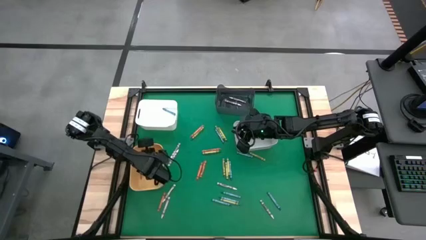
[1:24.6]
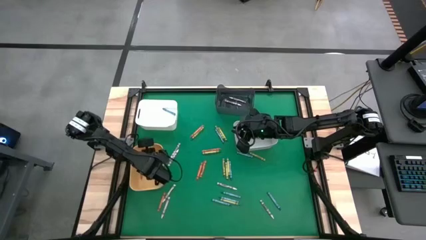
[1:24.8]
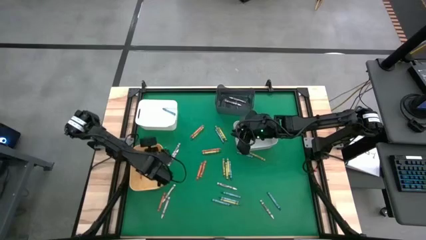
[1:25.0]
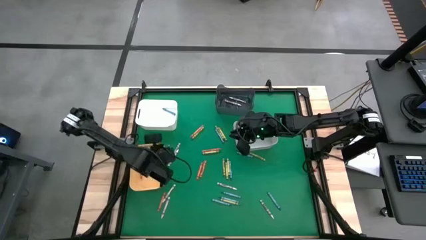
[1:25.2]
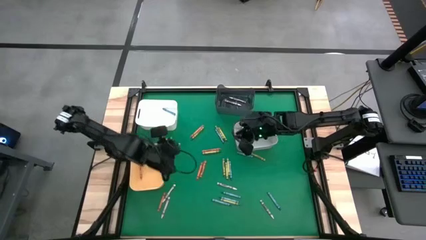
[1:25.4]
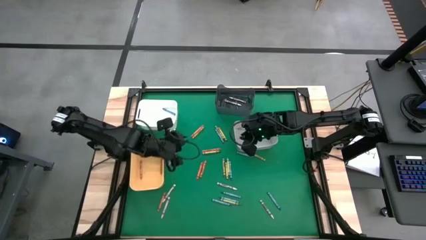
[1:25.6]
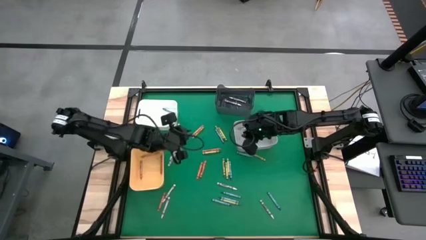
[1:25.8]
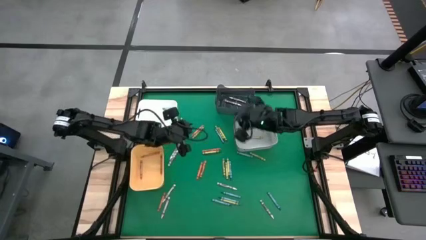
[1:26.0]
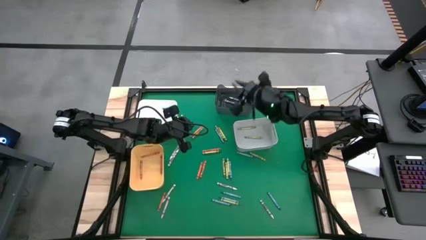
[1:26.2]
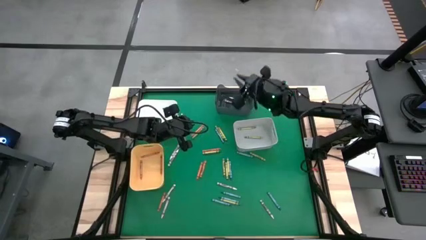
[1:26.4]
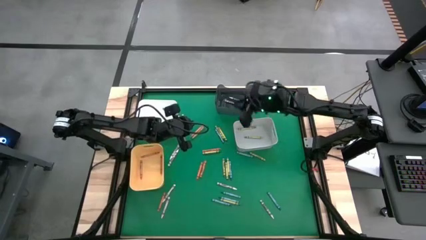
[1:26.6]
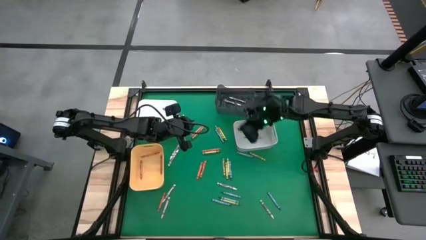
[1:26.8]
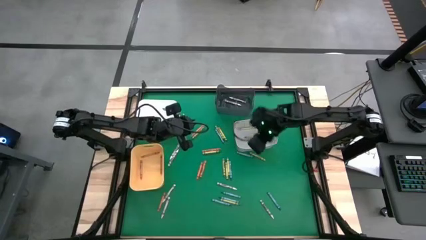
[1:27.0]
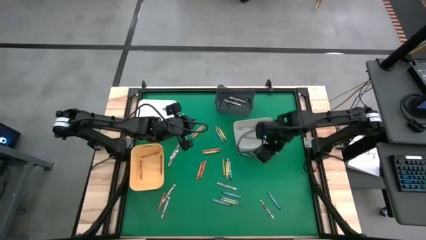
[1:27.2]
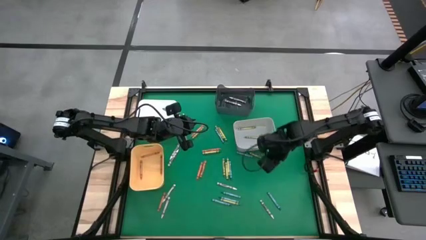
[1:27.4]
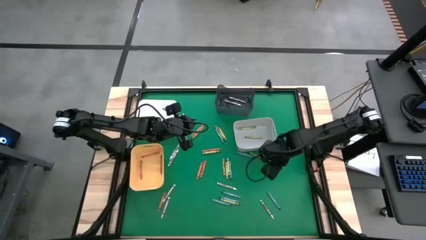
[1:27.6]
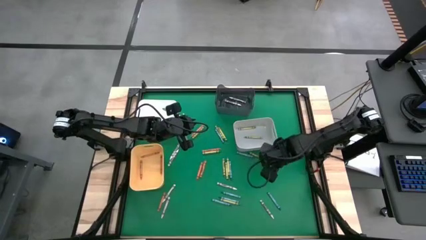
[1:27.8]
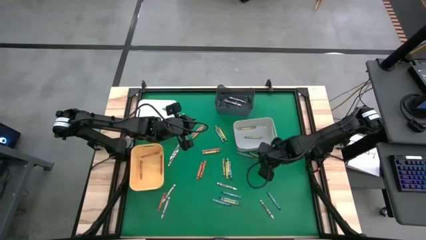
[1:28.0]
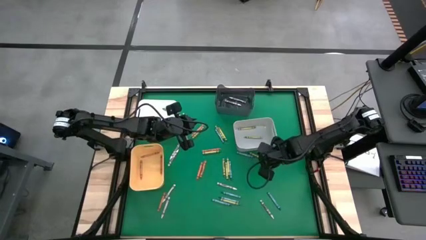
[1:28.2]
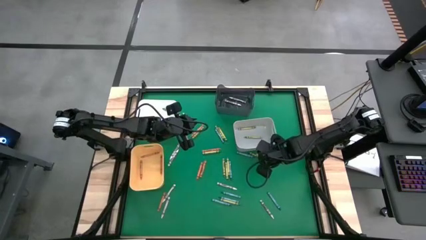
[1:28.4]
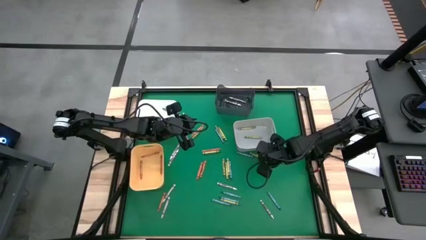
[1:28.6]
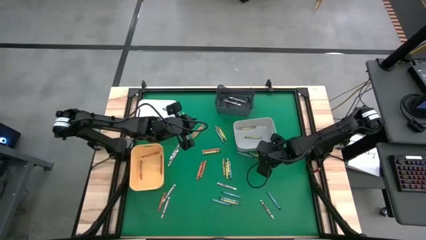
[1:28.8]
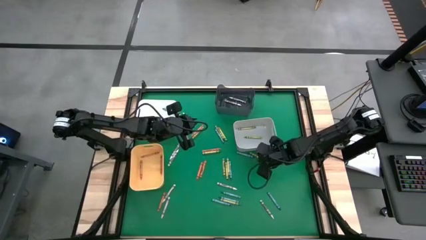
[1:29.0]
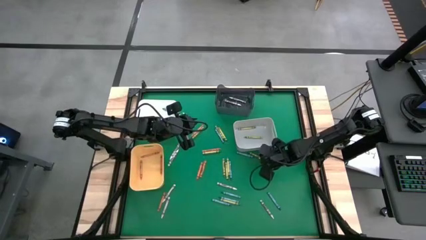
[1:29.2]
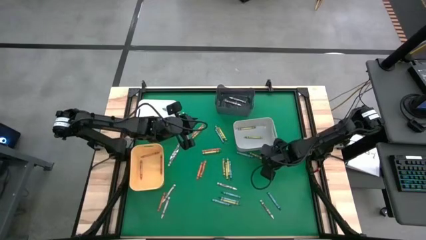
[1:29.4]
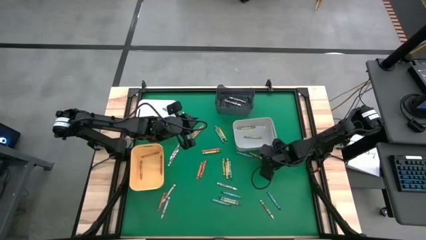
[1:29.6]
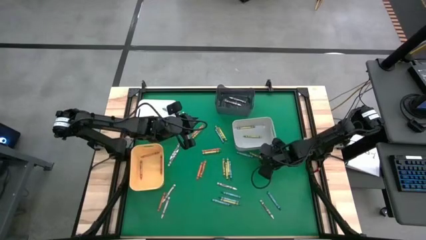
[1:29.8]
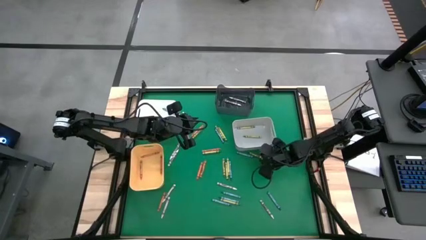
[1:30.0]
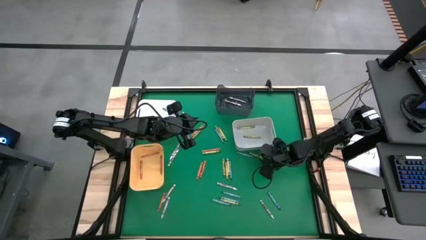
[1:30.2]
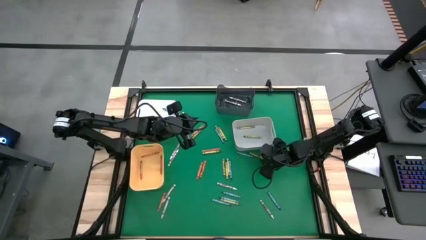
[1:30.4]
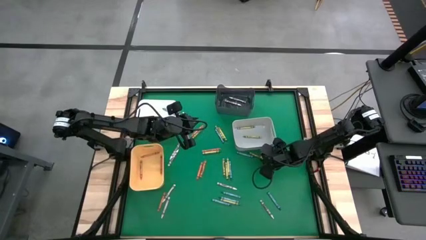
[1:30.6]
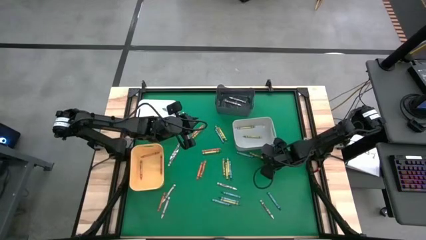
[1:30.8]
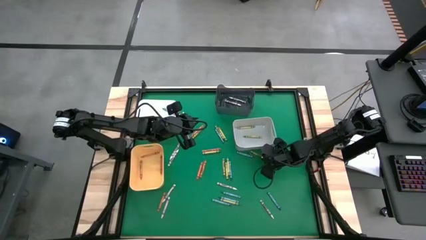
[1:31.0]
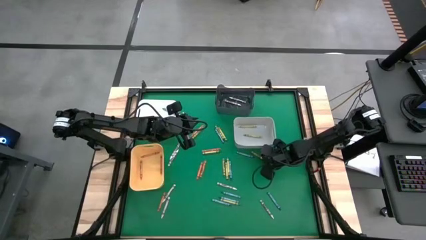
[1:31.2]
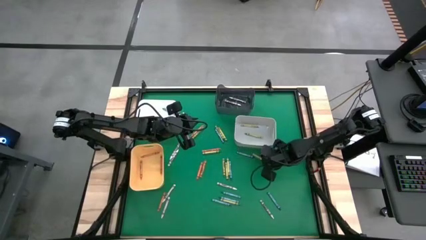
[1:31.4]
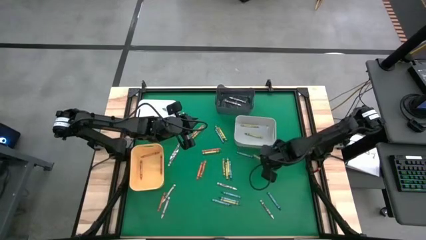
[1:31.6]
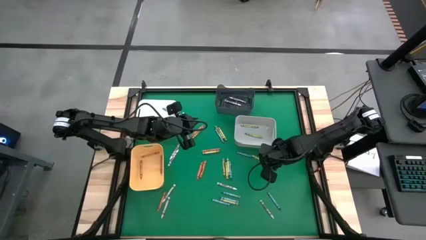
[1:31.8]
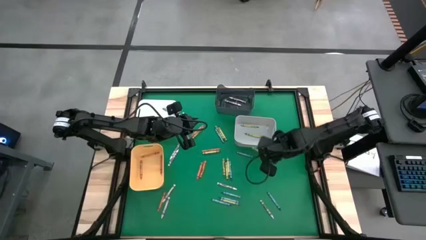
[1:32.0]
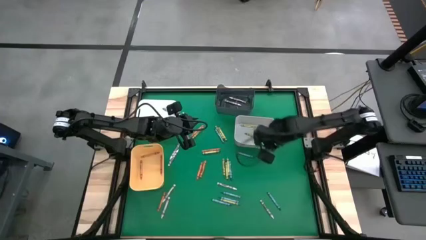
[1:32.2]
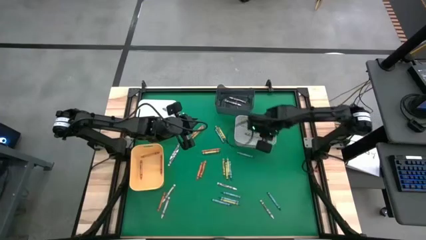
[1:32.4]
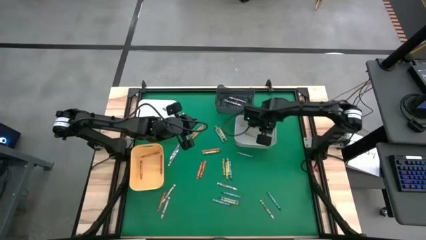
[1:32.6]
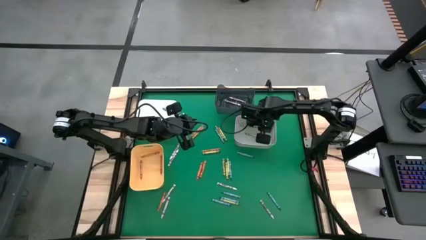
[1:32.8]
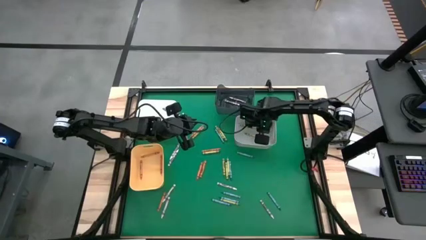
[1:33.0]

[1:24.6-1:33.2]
Task: Sort crayons
Put the green crayon into the gray bin

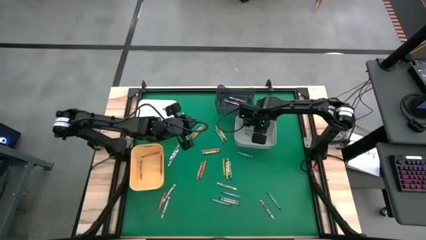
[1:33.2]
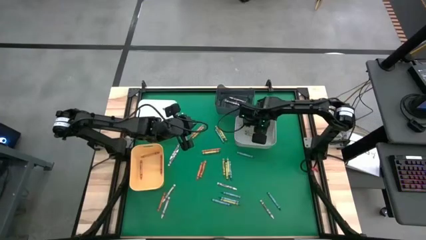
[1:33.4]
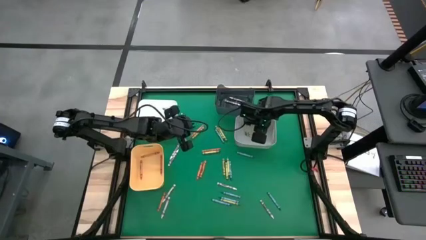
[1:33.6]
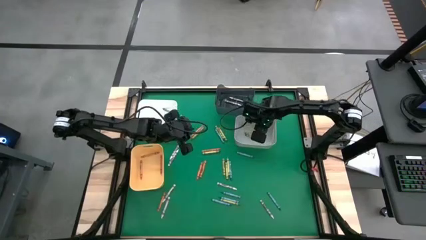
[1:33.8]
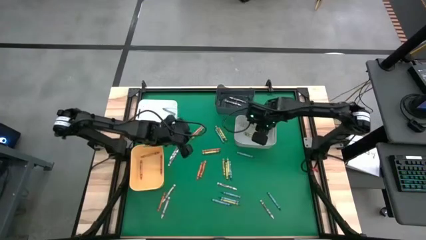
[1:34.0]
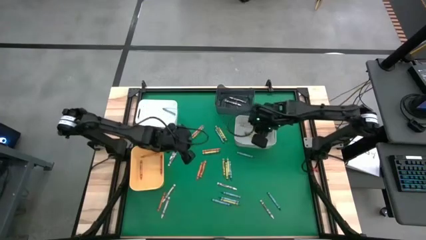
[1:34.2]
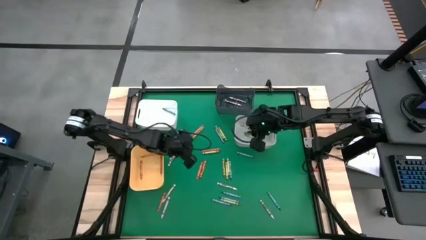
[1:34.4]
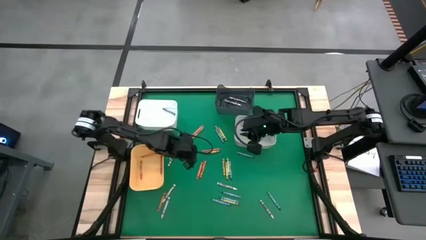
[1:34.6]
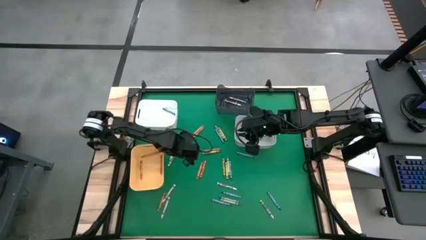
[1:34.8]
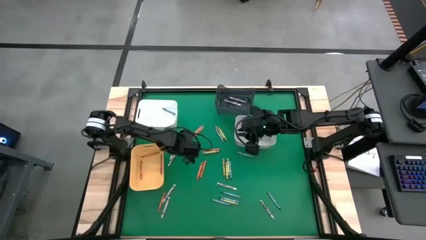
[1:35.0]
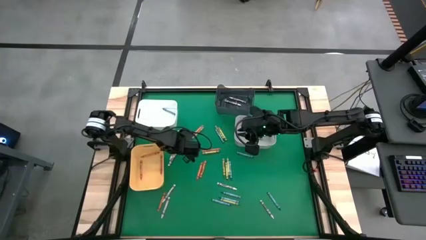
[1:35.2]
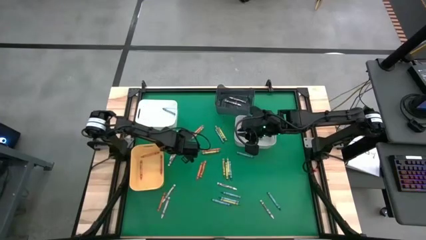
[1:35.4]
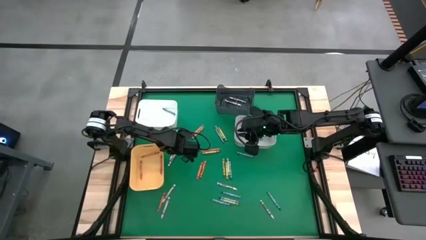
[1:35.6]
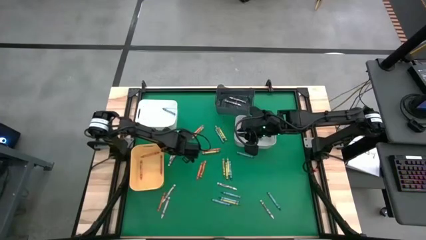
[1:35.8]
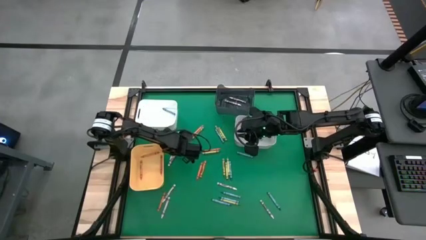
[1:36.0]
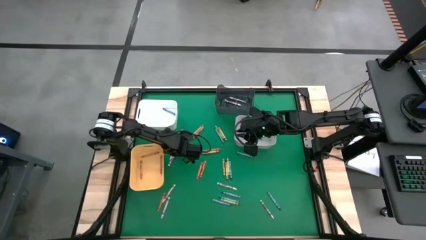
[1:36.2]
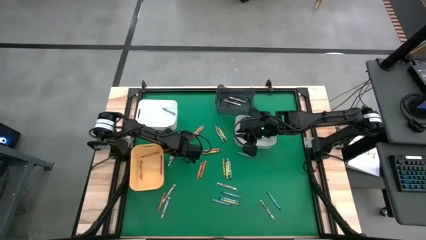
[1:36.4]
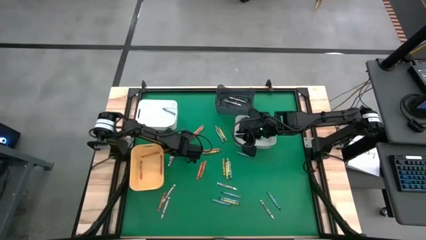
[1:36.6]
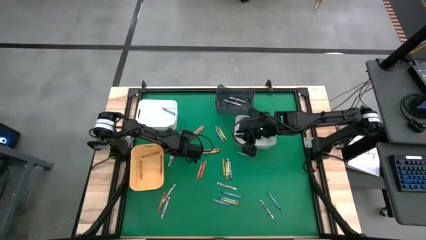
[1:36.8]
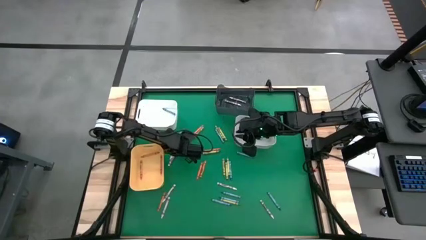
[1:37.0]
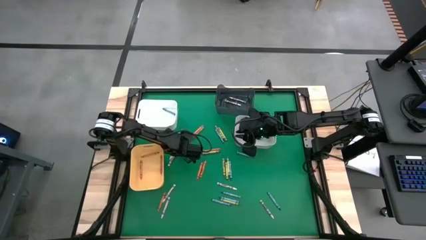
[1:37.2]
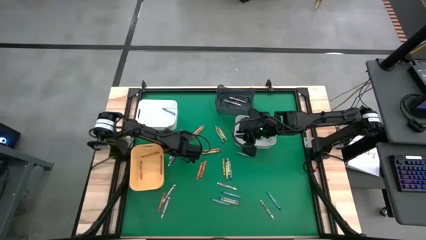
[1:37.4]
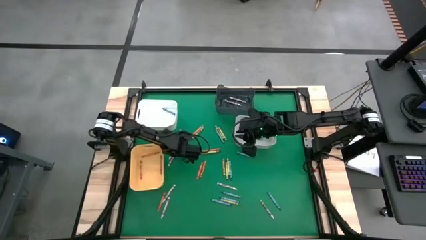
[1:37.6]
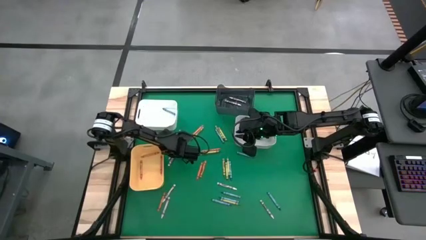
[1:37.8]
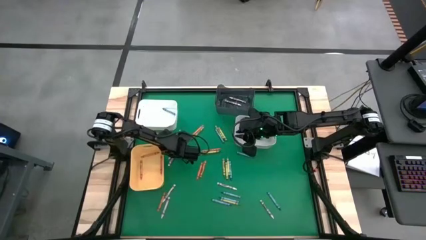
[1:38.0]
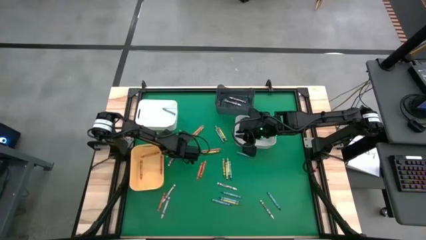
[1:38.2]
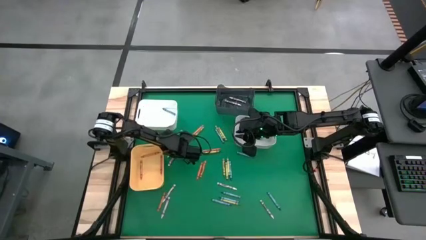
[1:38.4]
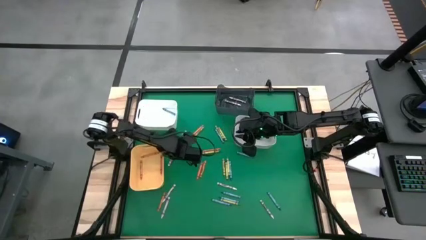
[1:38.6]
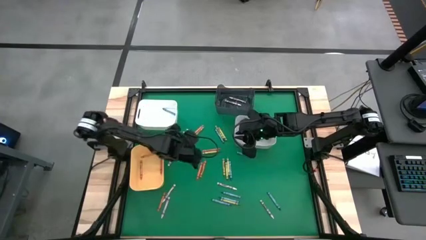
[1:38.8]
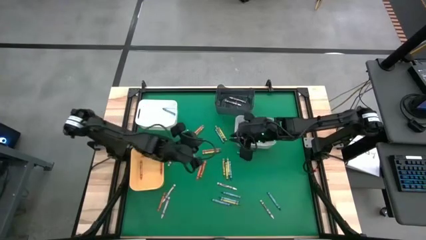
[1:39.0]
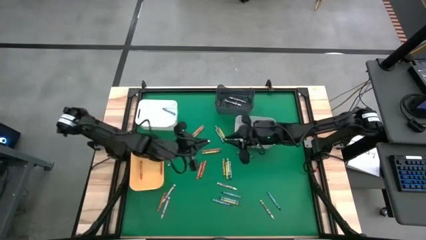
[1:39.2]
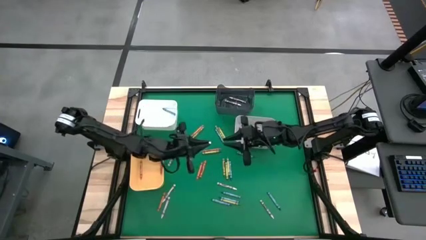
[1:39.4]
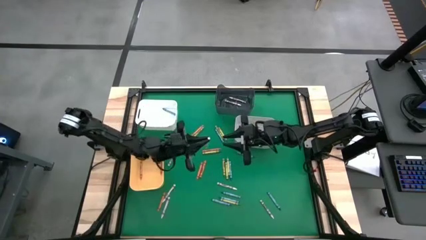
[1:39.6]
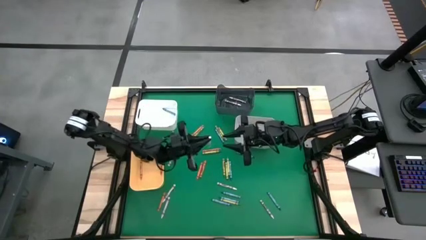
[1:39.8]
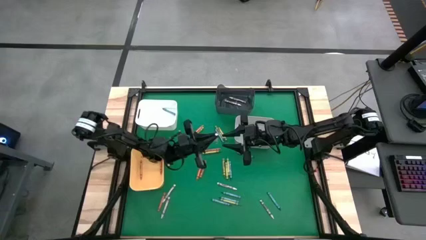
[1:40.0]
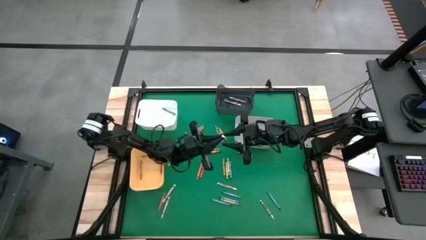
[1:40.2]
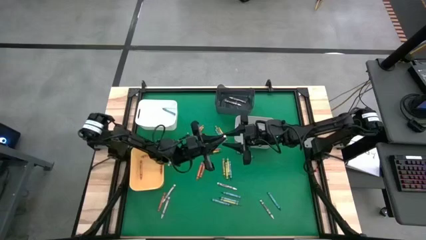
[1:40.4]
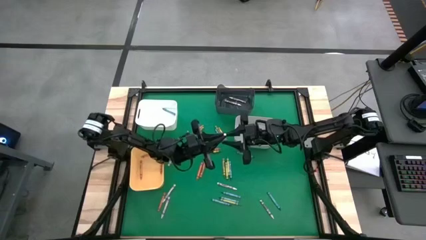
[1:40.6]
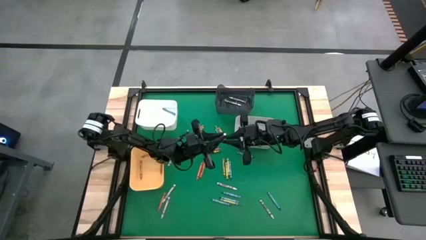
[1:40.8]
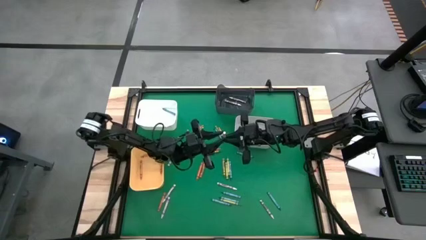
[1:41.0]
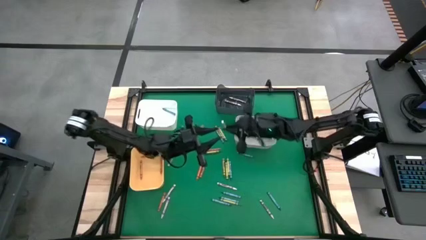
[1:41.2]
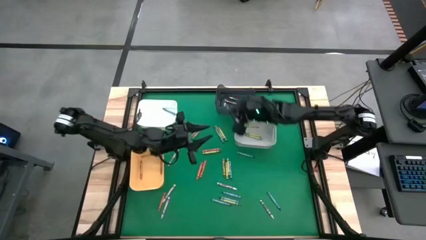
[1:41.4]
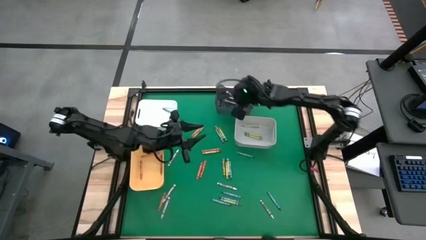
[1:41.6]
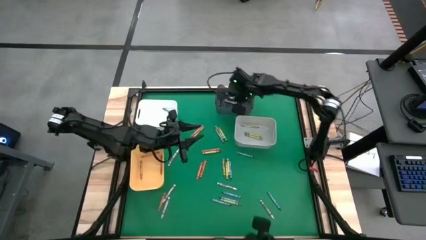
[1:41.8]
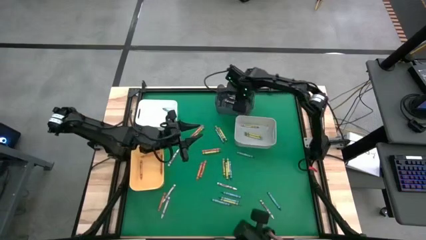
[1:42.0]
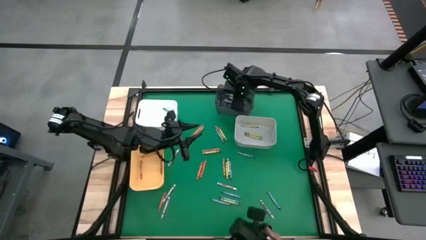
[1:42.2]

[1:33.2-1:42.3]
Put the white crayon into the black bin
